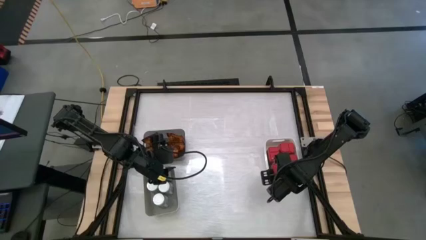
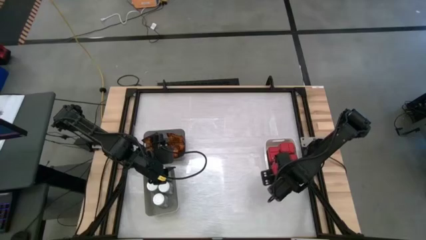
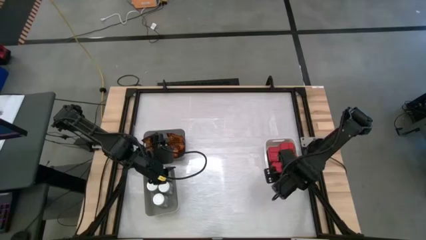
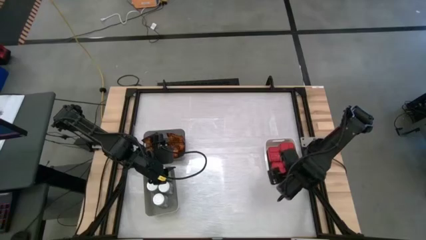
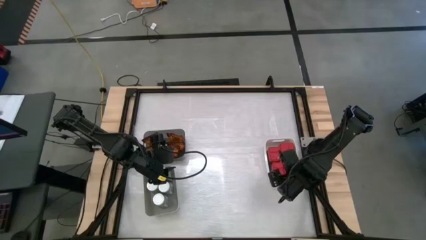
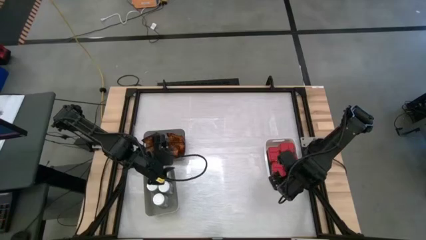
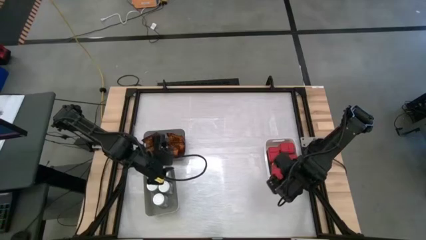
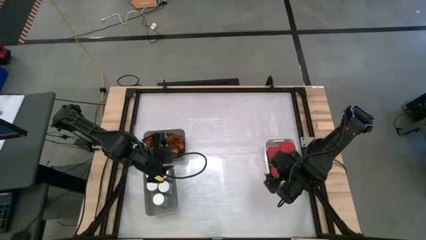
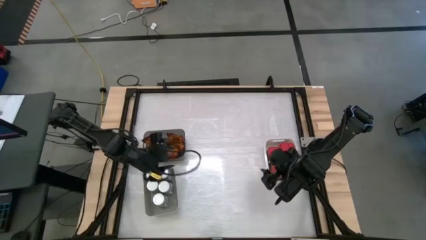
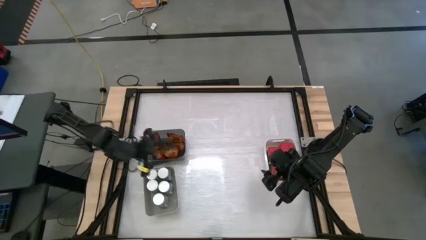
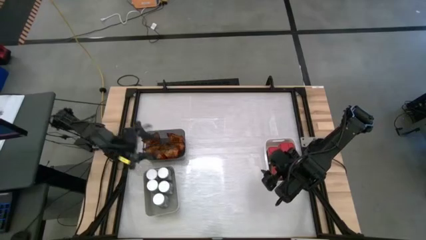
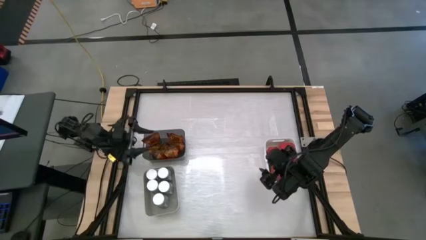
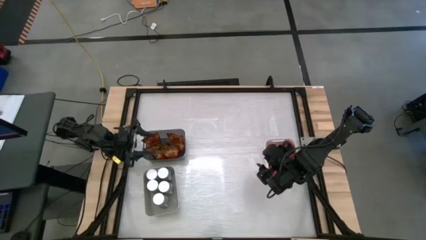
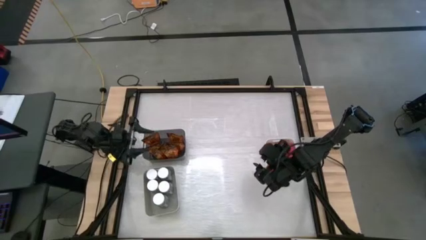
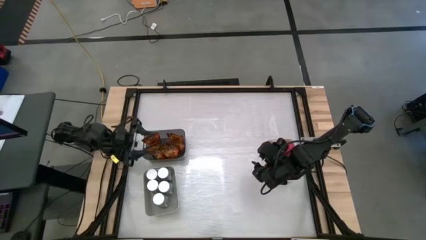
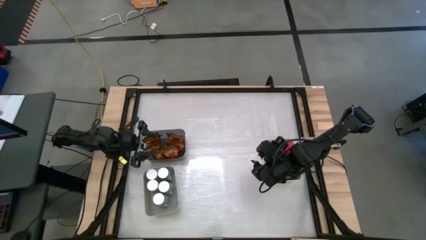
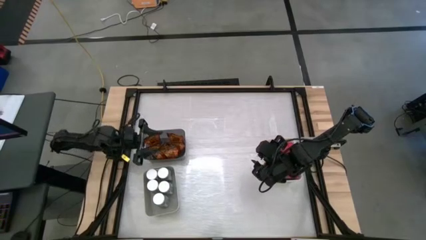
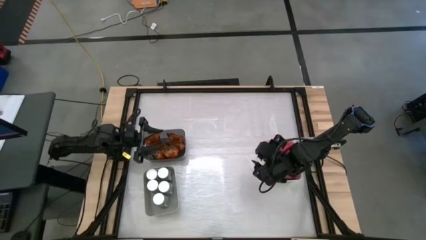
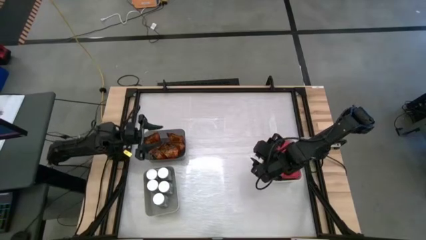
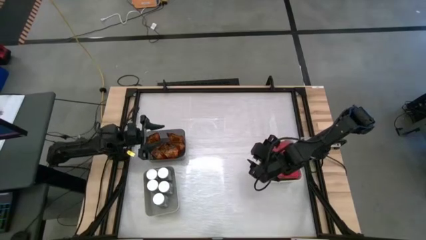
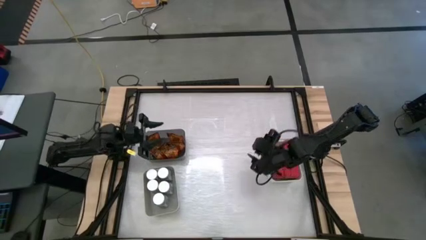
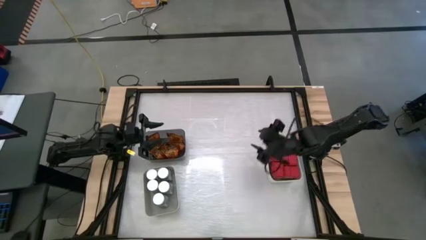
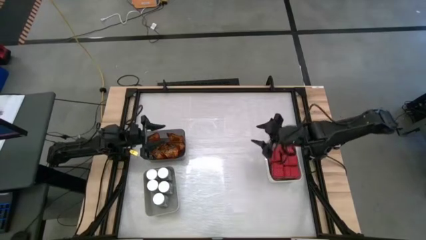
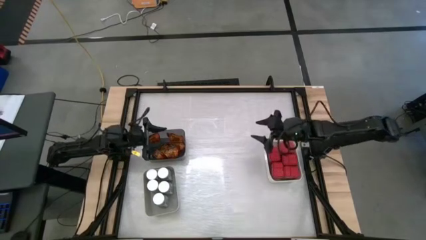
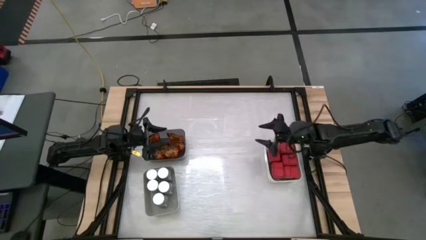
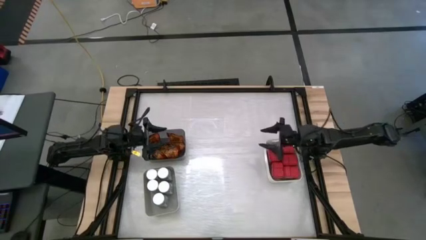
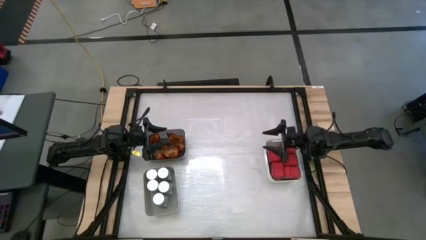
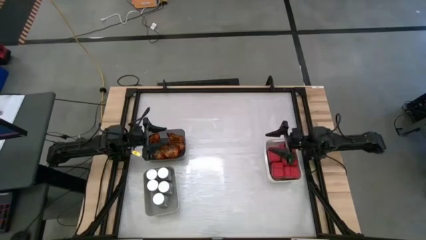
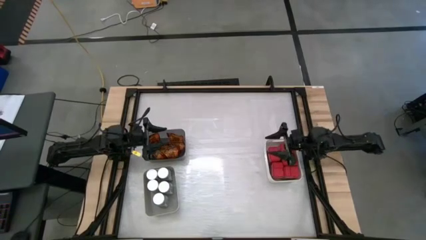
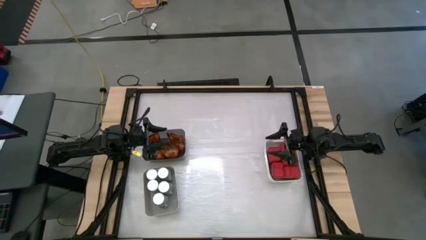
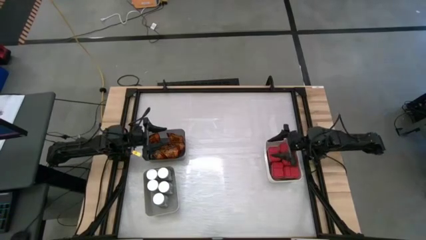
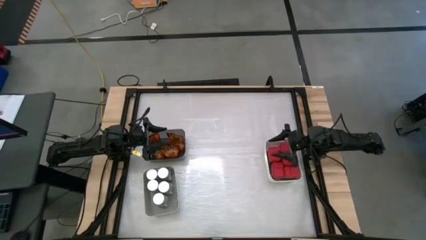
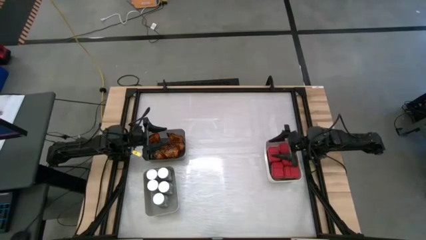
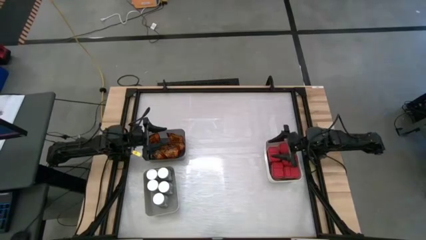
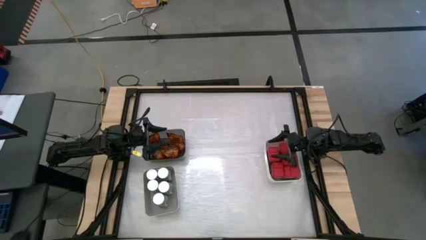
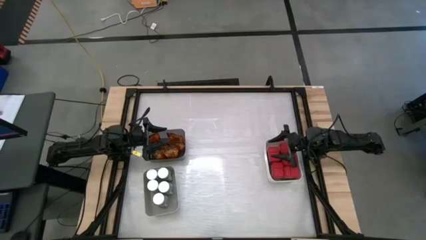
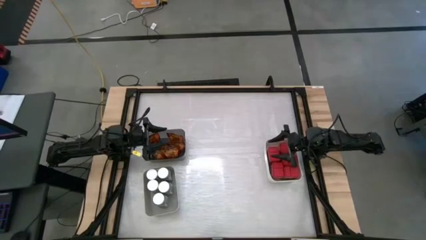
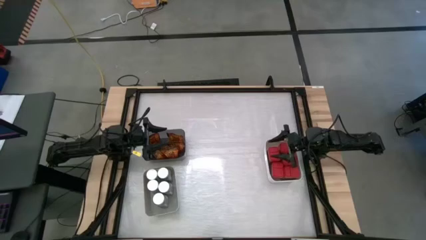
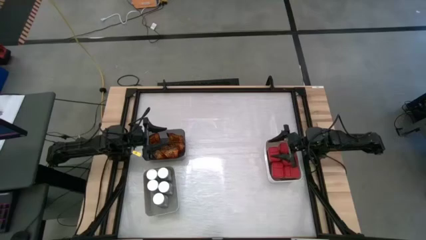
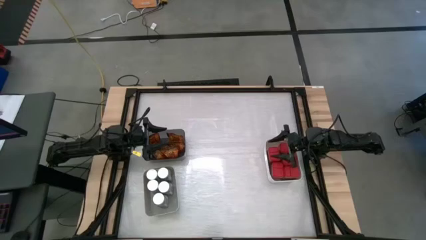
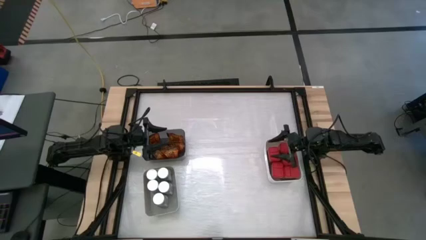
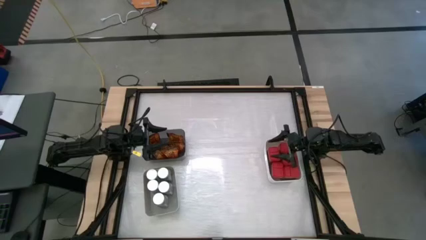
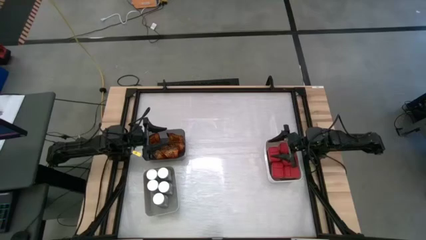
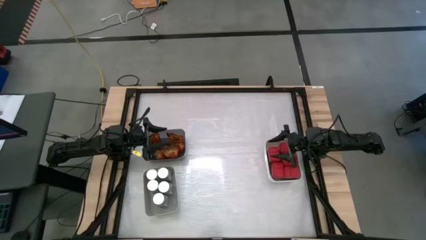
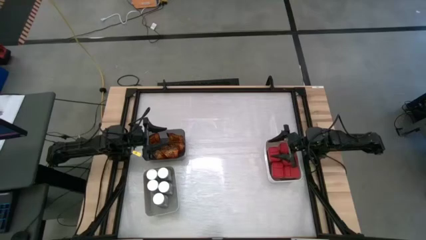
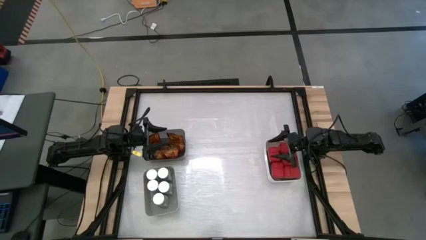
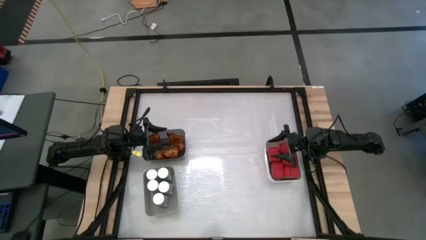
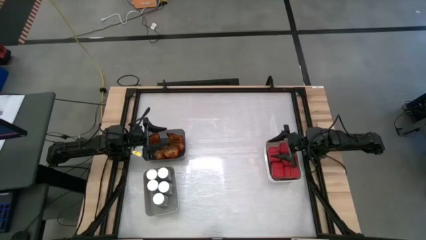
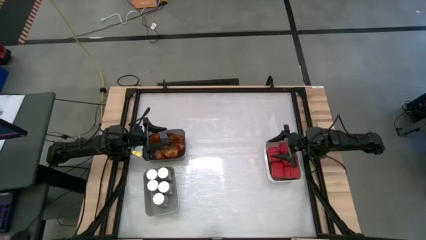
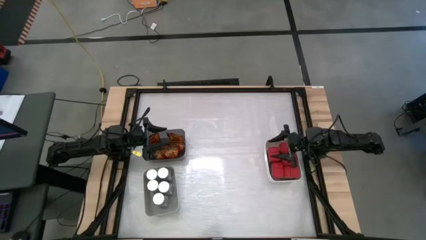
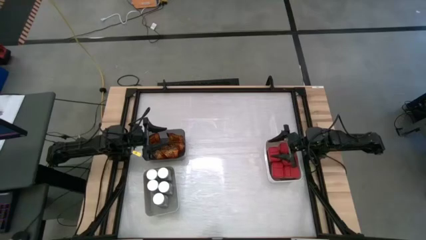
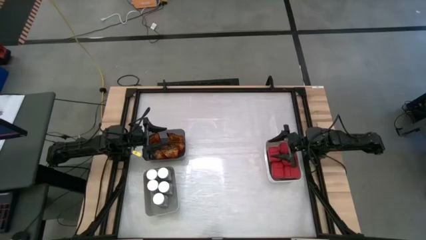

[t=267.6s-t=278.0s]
Task: Sort spices by type
Return to Home Position
